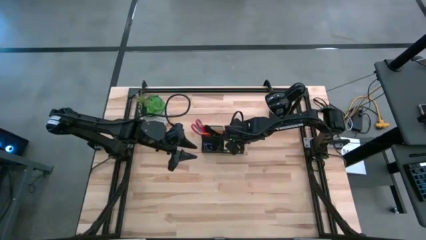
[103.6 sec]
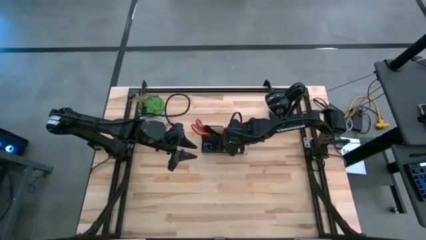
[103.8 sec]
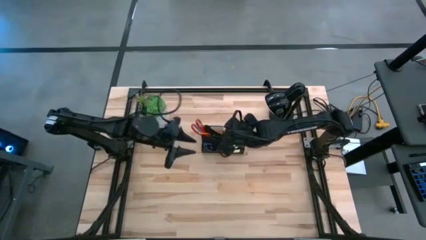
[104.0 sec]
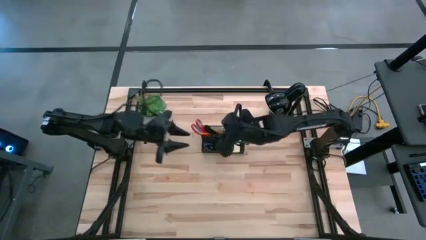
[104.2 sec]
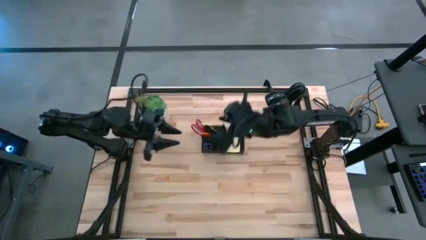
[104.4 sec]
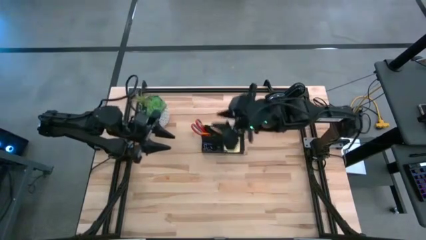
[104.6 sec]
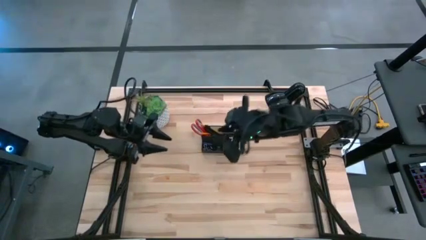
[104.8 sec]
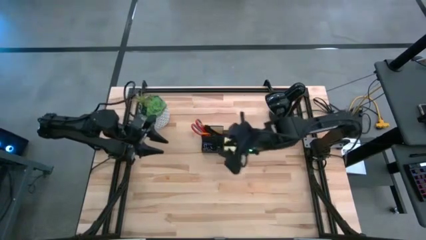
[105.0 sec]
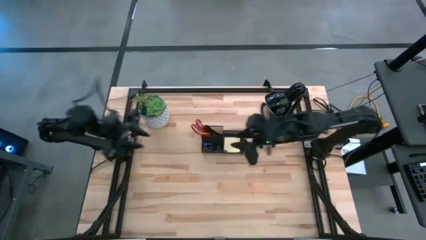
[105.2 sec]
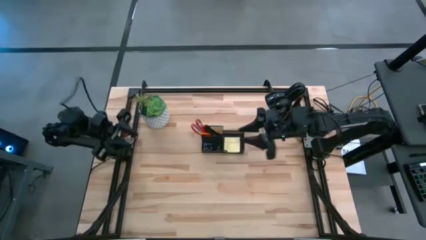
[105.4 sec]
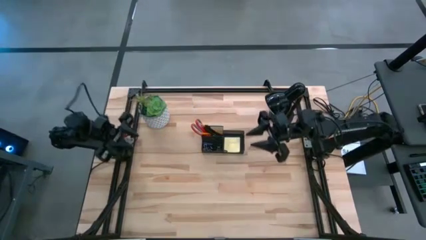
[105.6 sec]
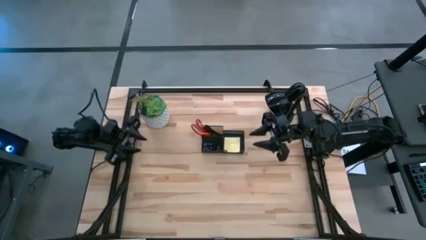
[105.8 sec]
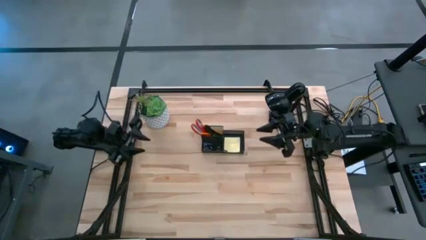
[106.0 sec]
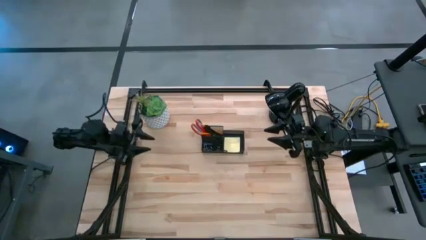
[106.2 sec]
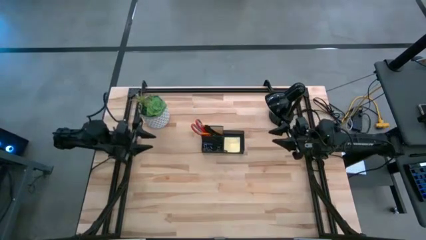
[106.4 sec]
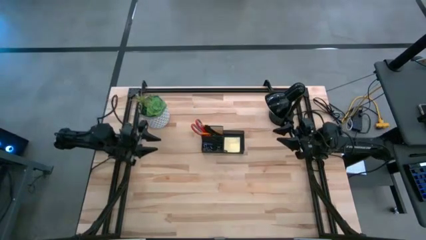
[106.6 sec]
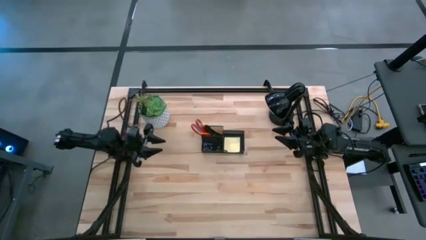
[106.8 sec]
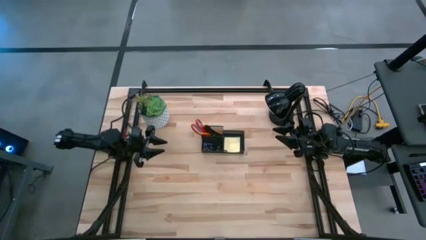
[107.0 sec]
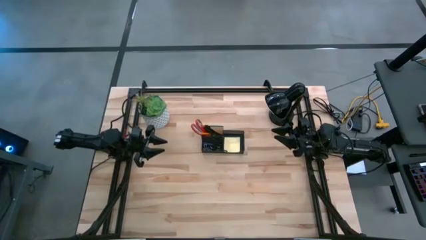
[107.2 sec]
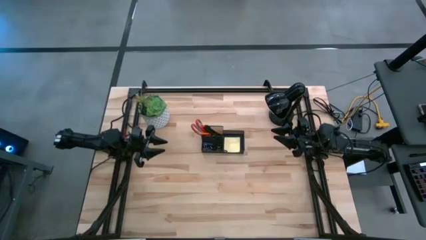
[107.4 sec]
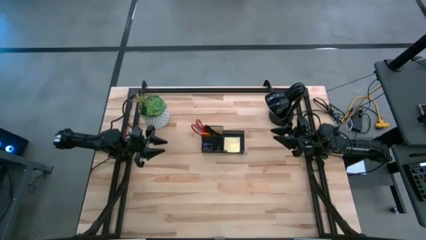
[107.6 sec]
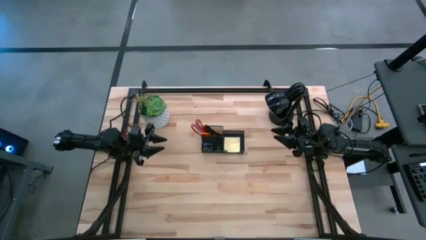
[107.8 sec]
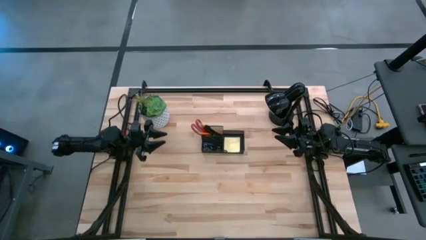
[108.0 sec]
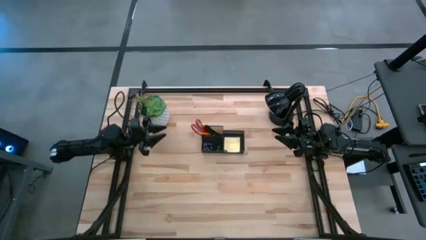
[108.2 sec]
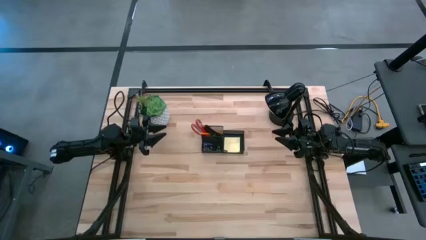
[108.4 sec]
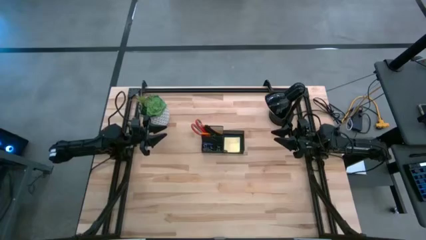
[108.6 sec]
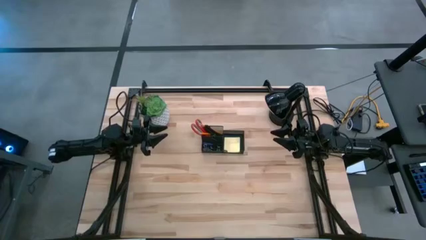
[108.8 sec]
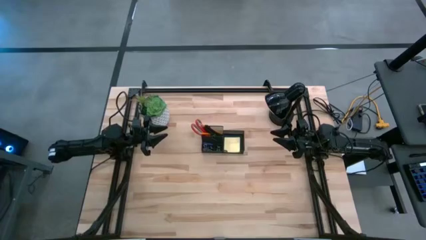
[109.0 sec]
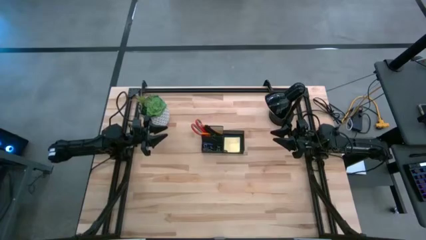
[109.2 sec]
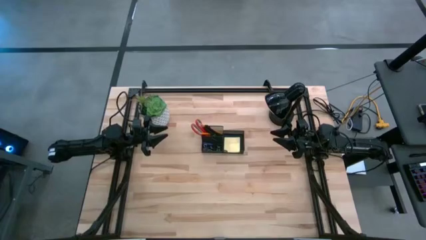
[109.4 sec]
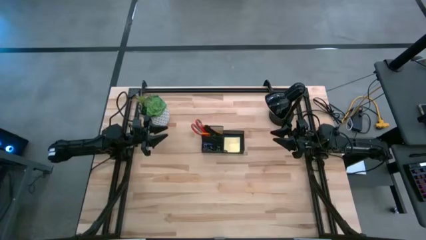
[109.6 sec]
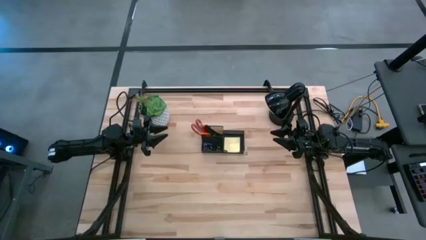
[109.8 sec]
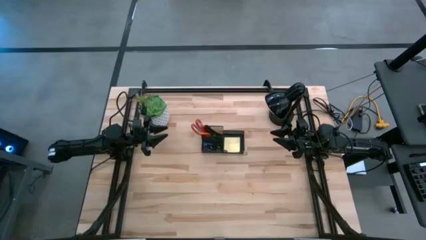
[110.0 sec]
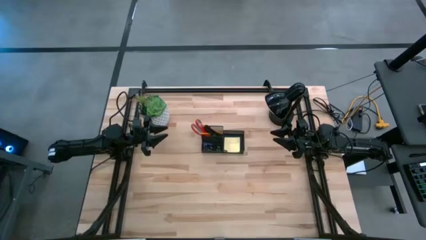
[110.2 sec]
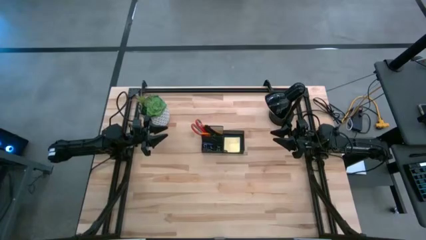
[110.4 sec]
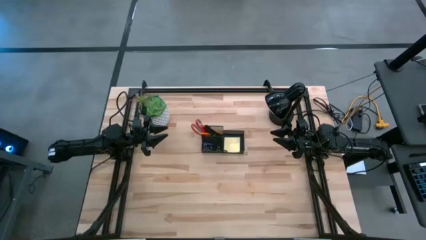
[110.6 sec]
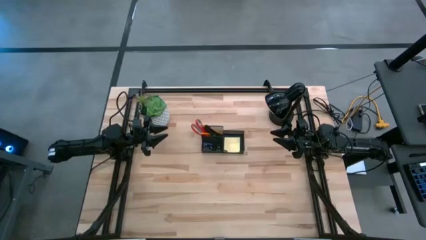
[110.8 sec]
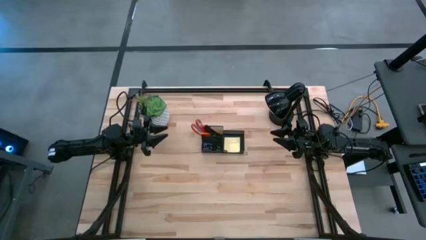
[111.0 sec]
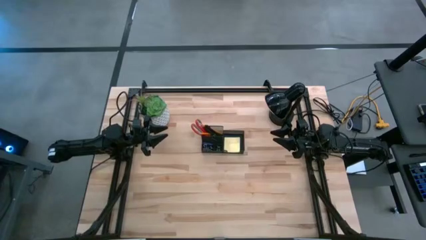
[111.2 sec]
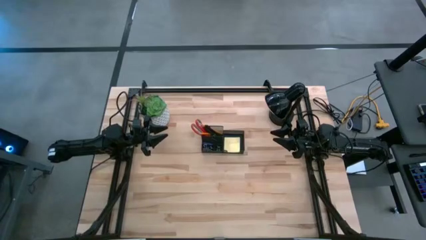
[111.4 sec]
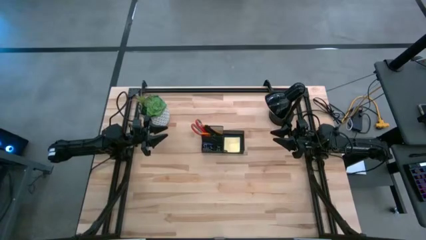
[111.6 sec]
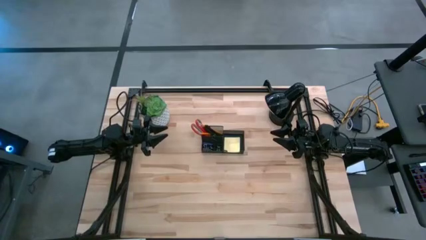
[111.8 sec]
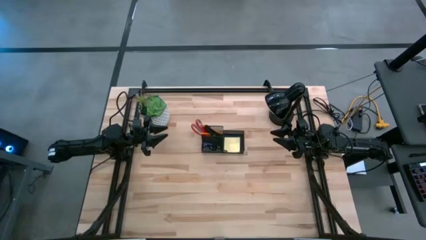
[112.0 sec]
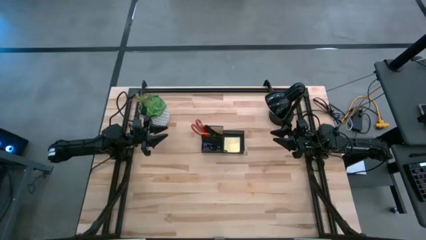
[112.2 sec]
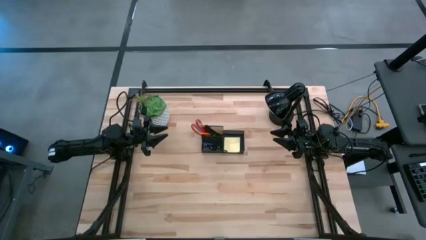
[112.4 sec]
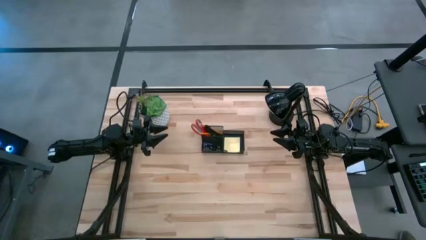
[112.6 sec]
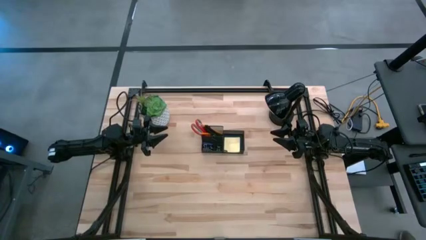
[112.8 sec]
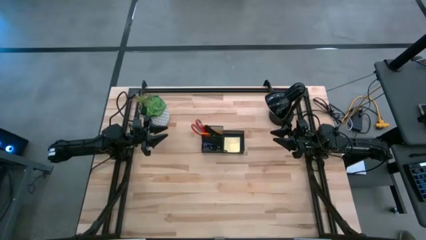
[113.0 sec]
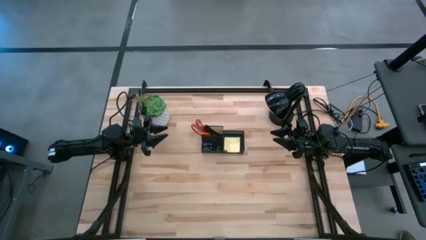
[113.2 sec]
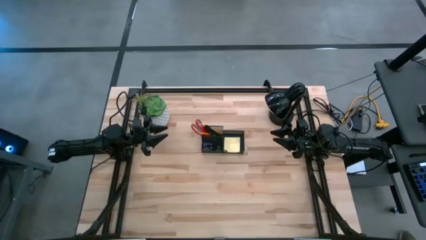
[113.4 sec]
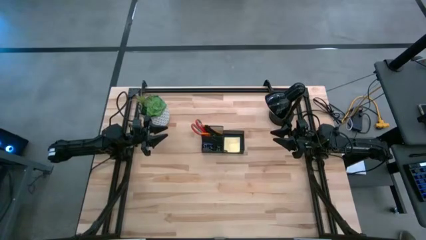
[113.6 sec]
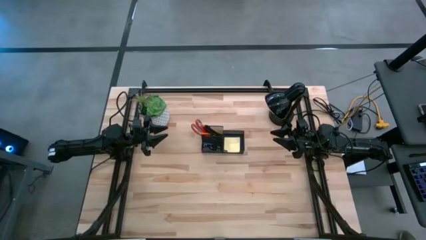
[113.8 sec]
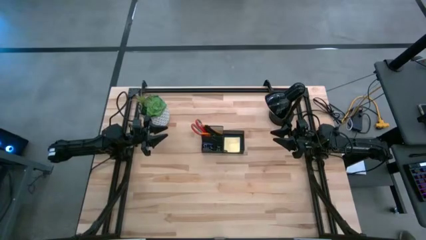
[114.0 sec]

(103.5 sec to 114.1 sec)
Task: Pick and place office supplies into organizer
Return to Home Position

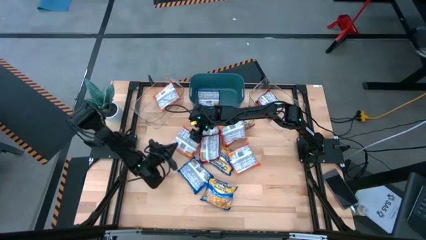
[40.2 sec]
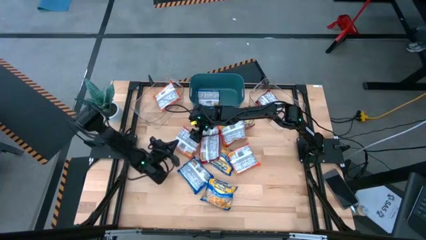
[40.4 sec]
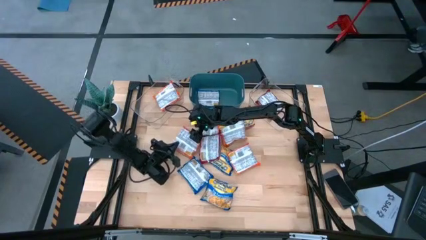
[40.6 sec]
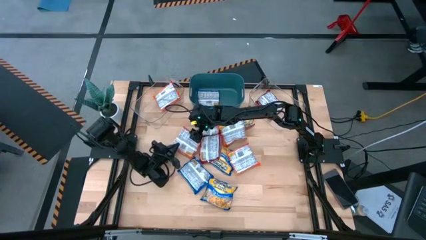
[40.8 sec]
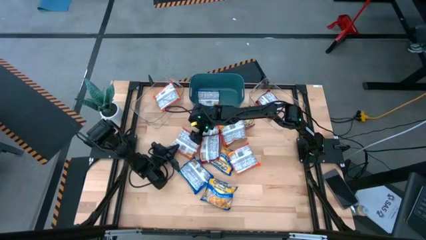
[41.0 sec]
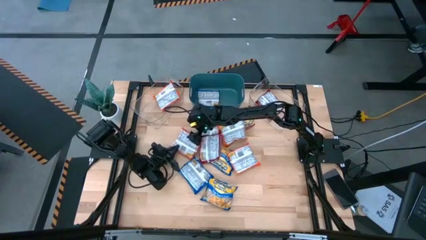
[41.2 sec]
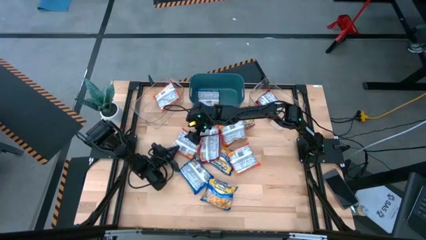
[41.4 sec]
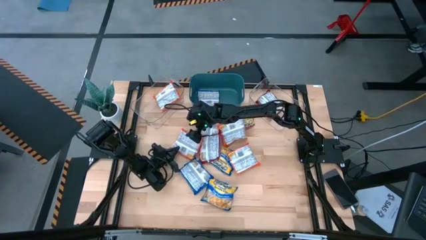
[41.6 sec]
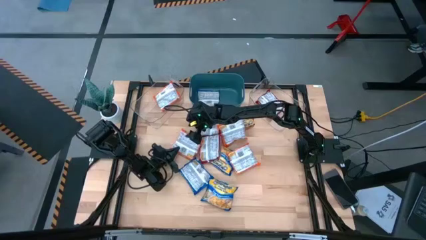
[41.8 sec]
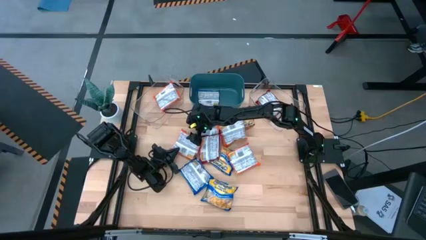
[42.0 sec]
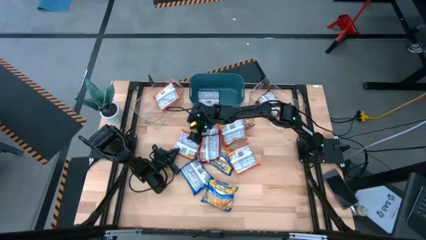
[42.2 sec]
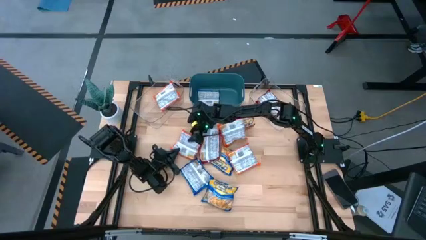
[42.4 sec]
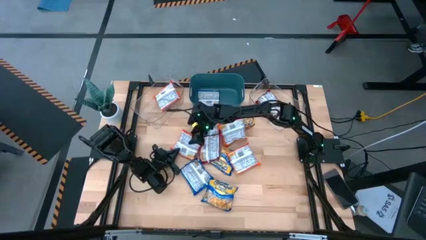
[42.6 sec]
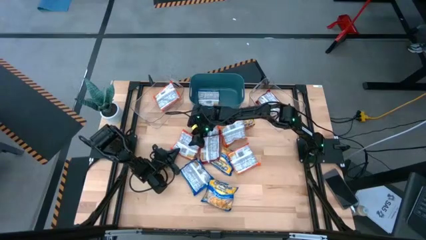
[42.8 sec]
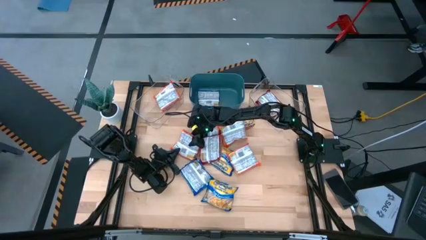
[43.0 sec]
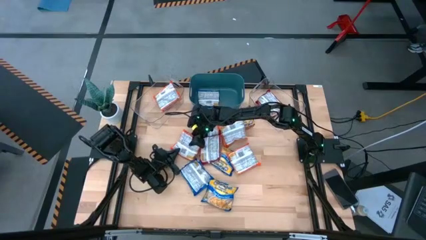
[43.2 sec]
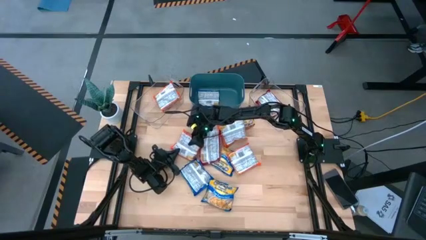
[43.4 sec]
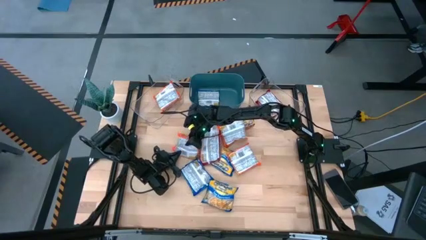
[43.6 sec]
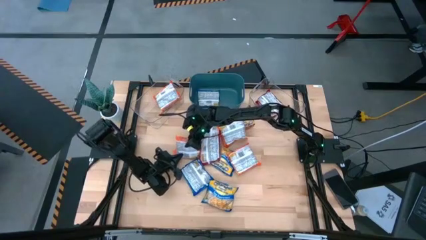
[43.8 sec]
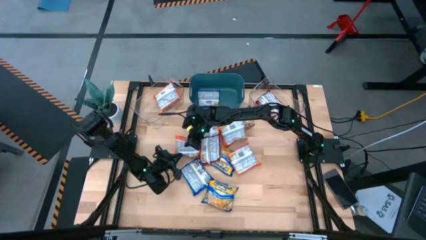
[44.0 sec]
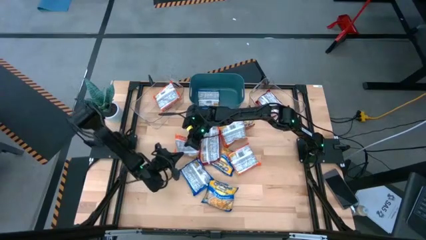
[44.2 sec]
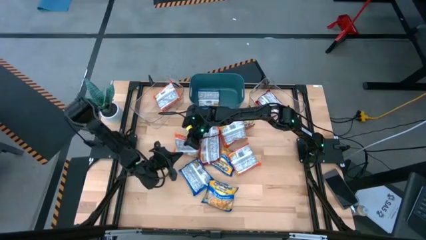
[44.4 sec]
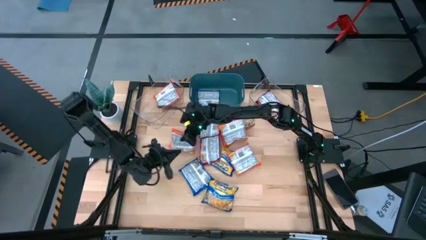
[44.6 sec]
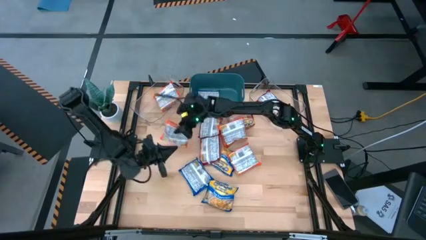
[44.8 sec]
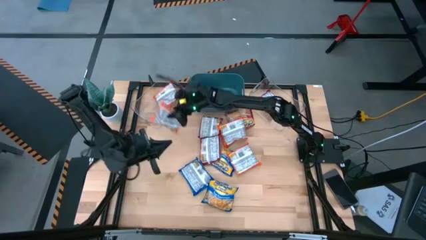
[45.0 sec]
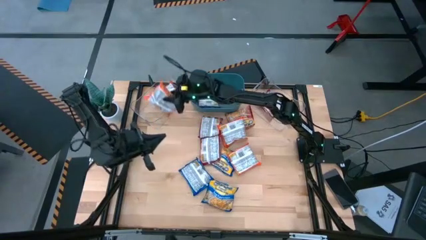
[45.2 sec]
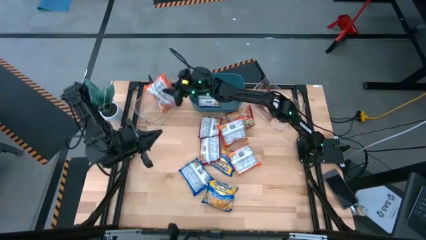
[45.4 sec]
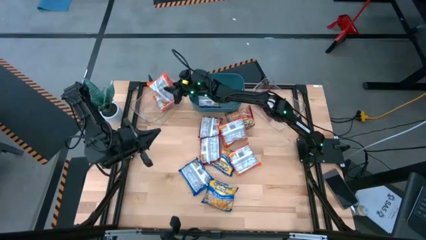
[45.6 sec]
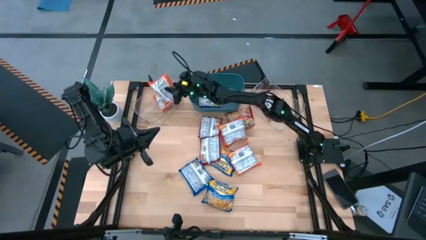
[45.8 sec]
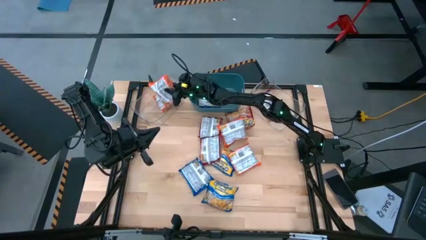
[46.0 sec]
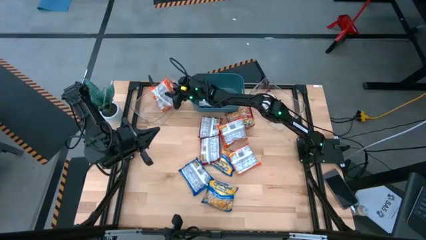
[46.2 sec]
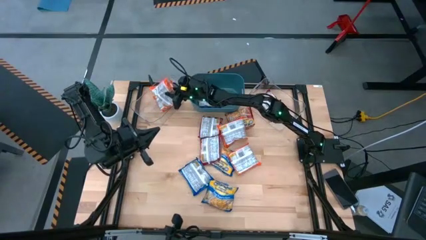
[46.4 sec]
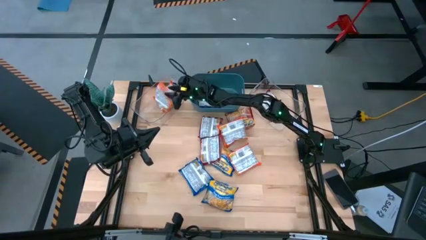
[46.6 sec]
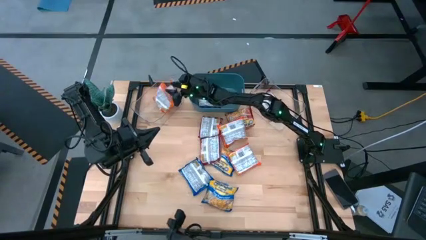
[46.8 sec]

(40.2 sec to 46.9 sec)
Task: Sort Maruchan noodles
Put the orange noodle pack into the left transparent bin
